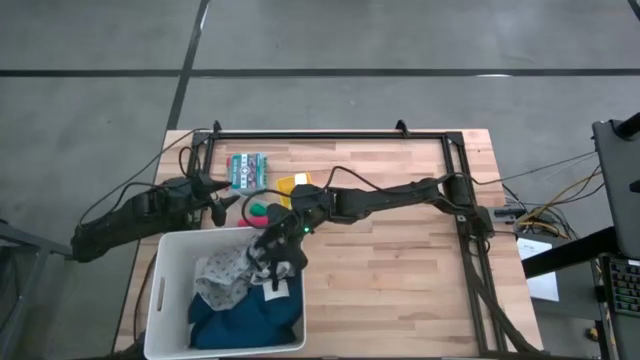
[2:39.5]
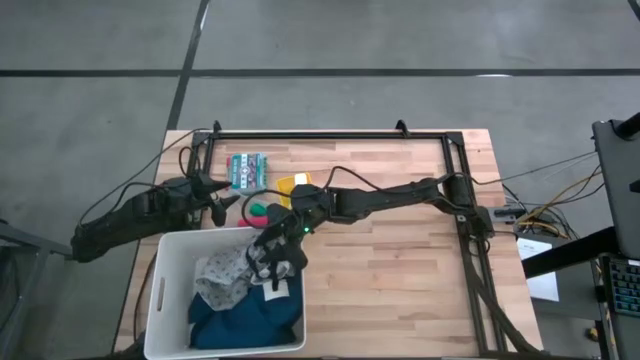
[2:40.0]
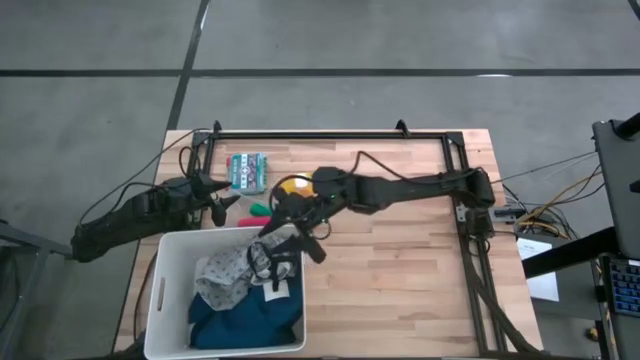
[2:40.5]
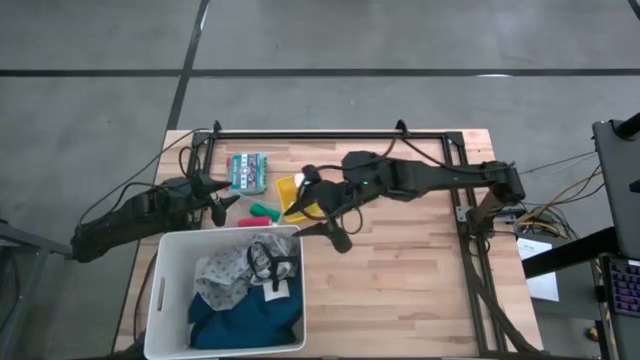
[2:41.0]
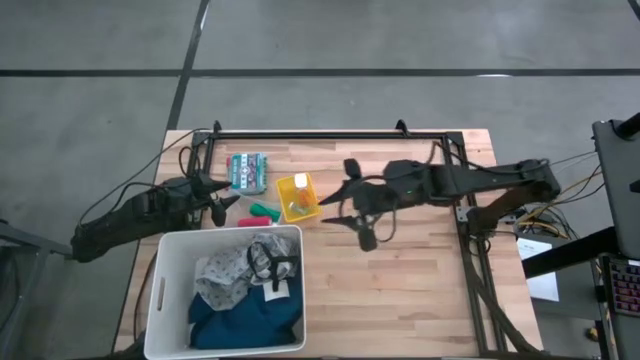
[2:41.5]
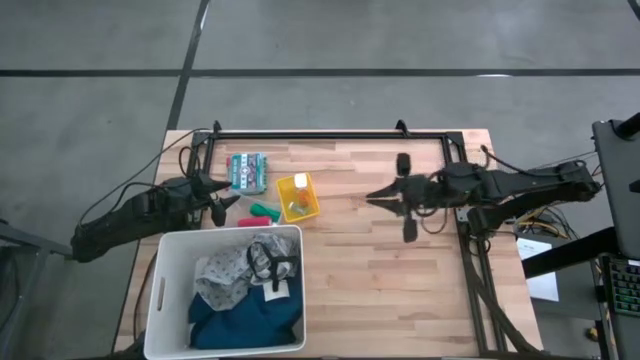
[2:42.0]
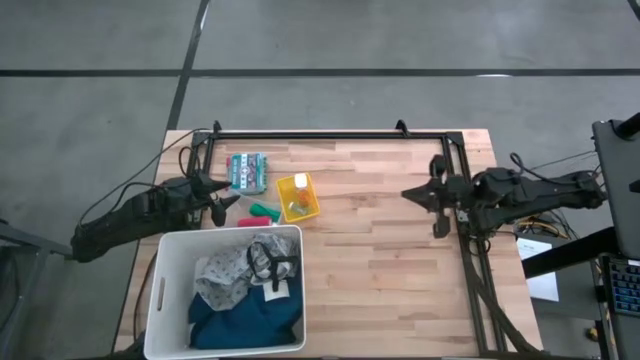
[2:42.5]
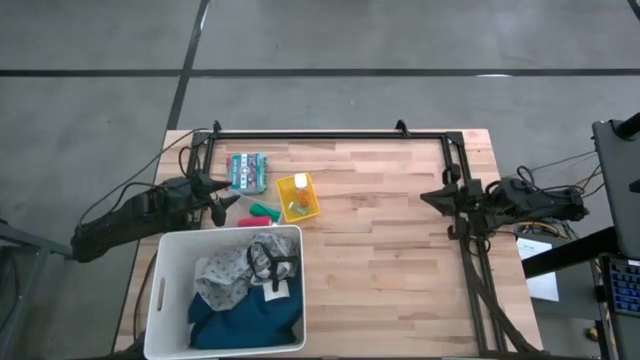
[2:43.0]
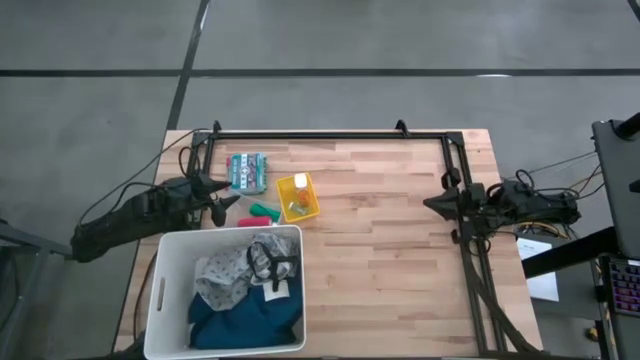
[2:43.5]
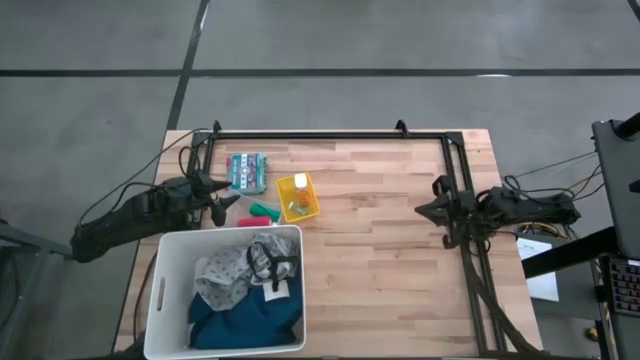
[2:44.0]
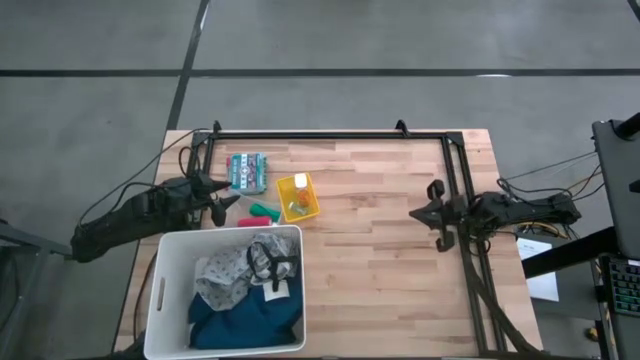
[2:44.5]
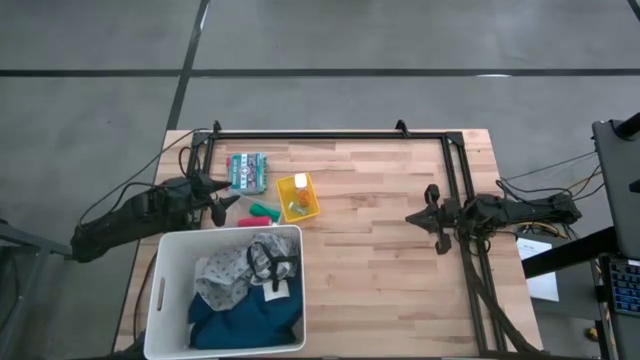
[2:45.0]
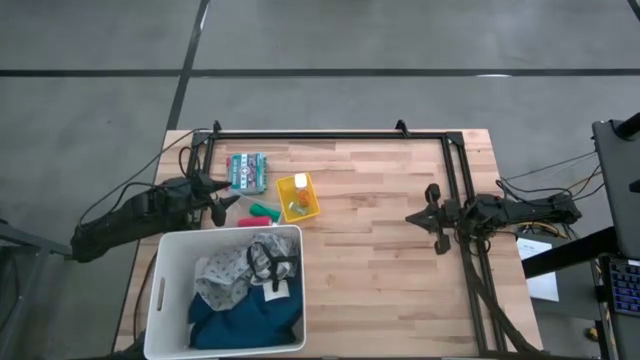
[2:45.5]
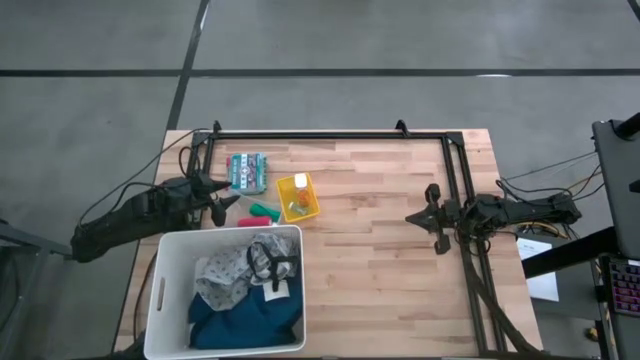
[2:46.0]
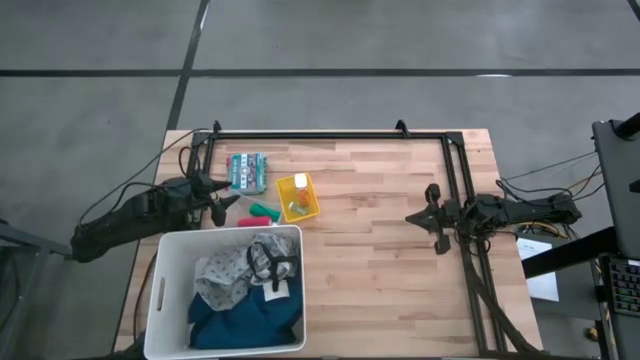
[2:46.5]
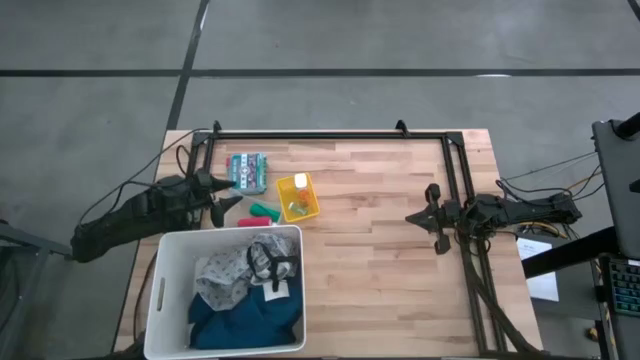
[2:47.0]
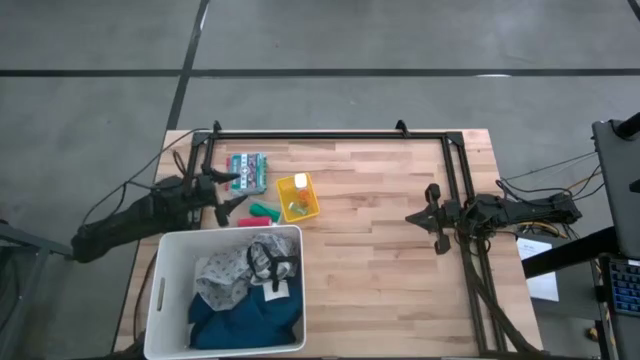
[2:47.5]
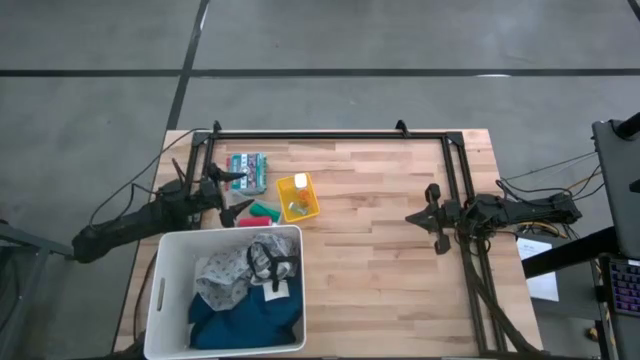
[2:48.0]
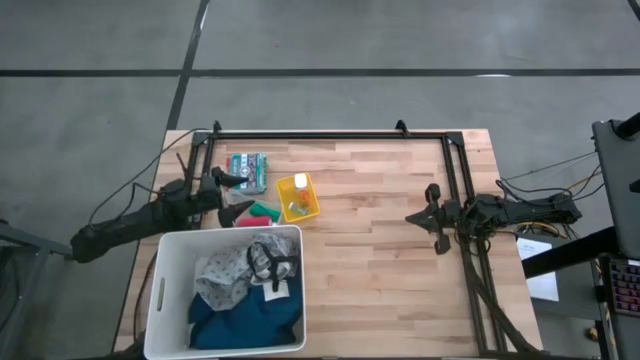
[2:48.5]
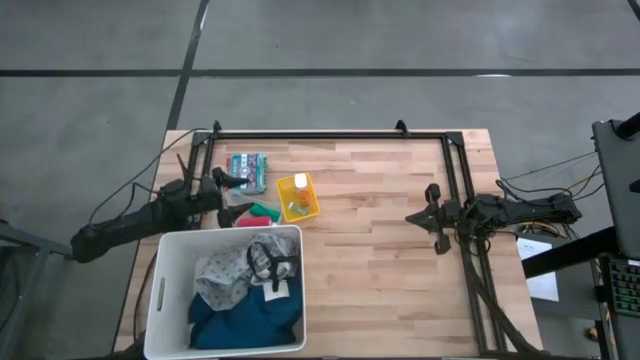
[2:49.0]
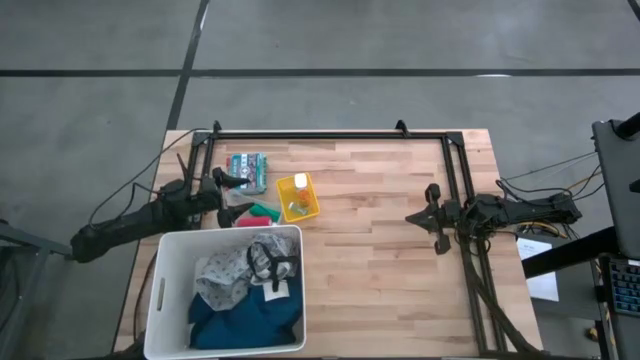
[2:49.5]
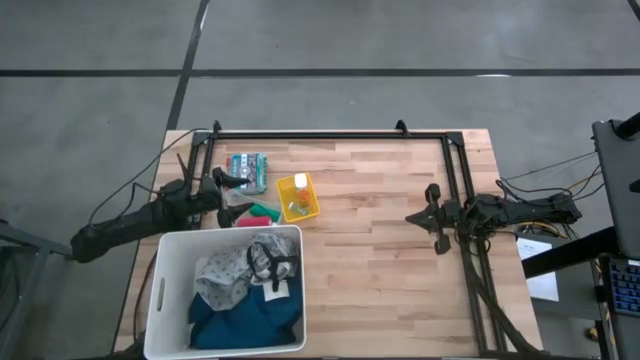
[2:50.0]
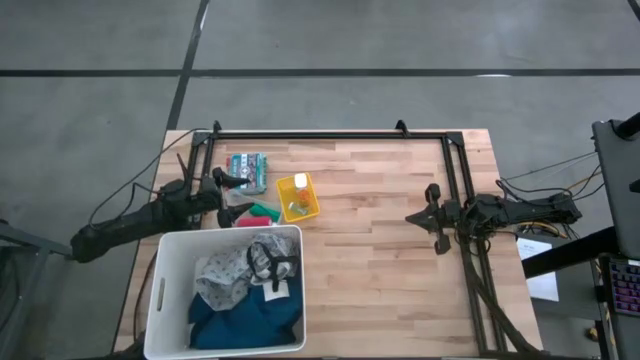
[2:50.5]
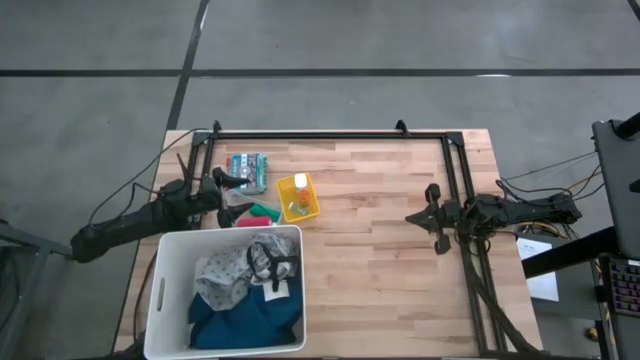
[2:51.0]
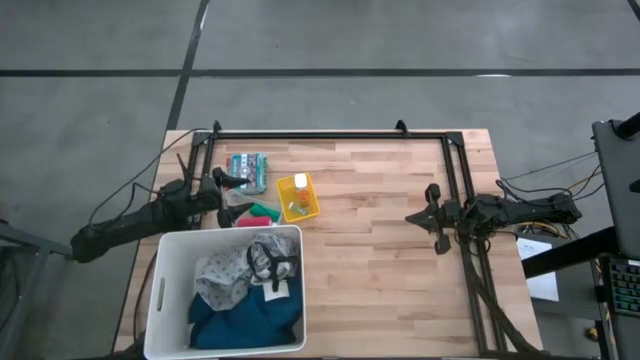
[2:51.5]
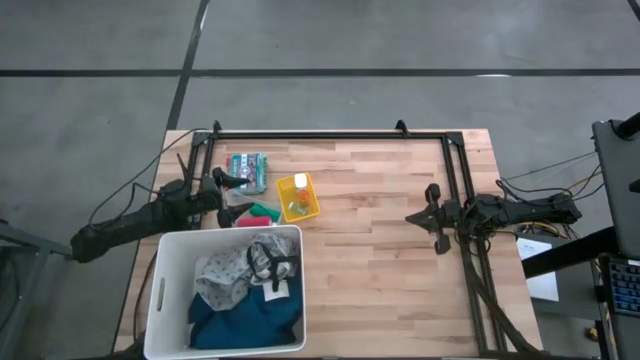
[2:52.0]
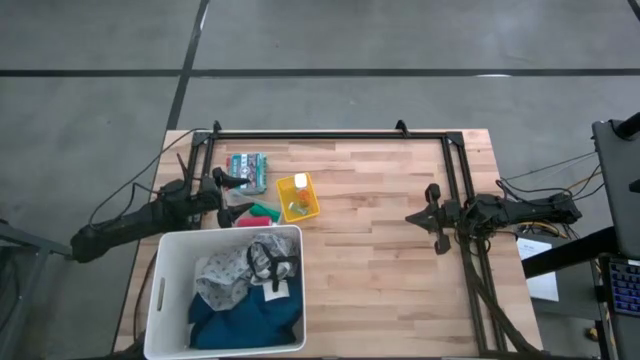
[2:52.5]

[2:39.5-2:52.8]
Task: Pick & place medical supplies in basket/bin
Return to Home Position

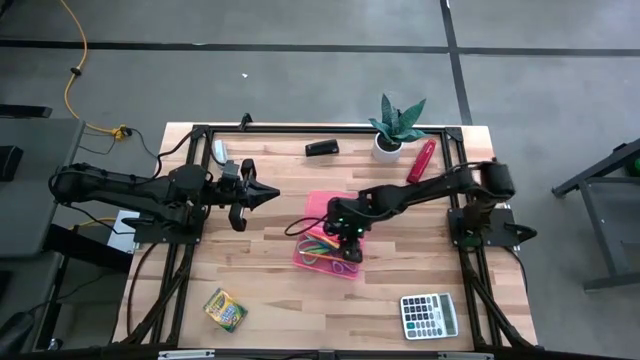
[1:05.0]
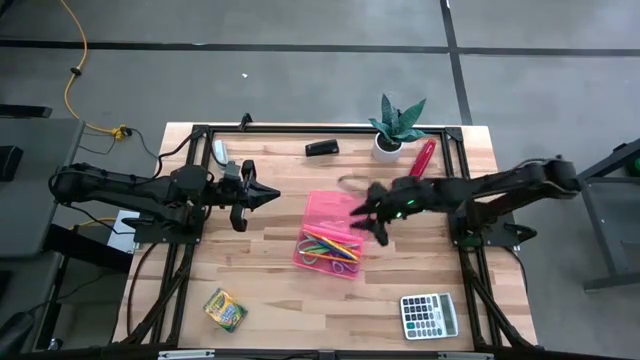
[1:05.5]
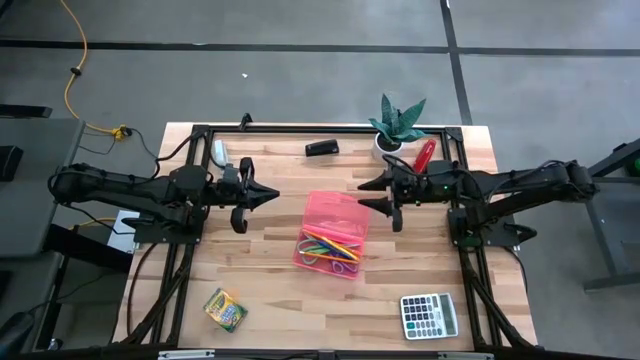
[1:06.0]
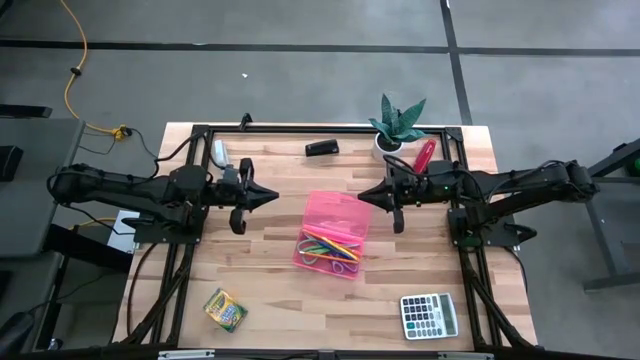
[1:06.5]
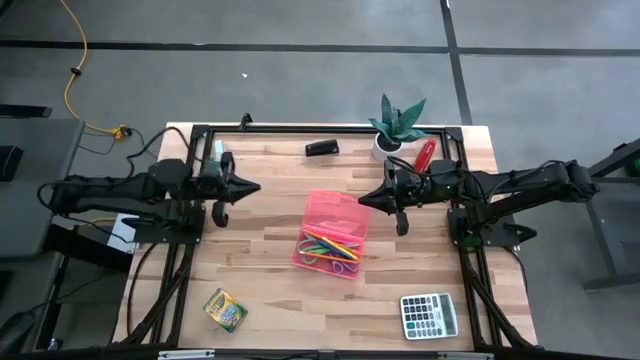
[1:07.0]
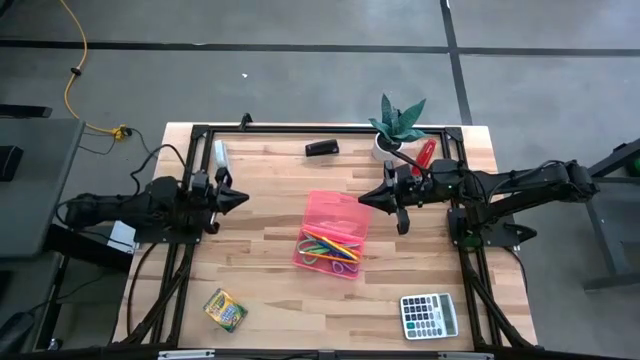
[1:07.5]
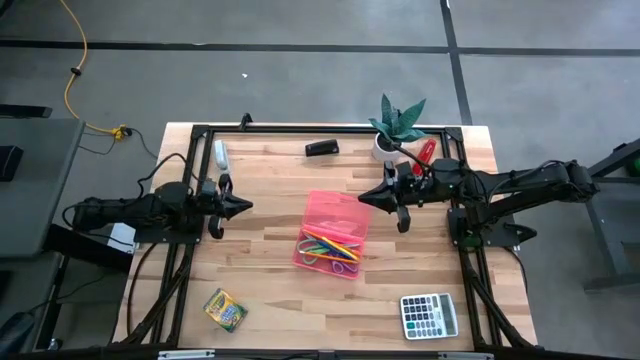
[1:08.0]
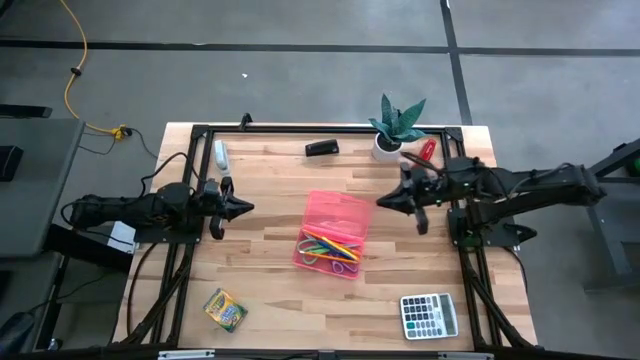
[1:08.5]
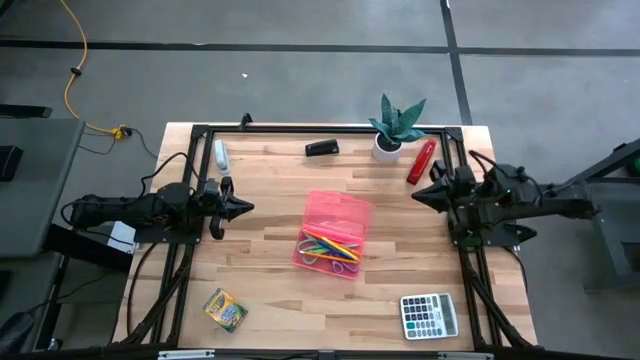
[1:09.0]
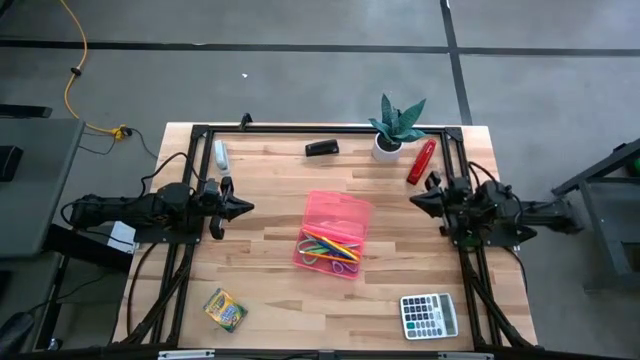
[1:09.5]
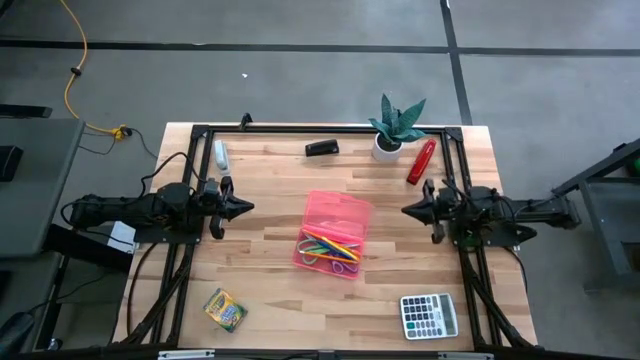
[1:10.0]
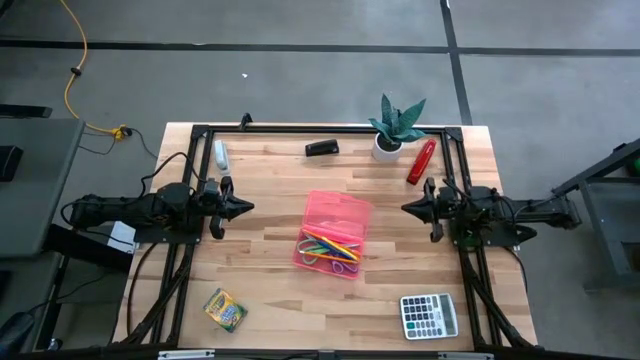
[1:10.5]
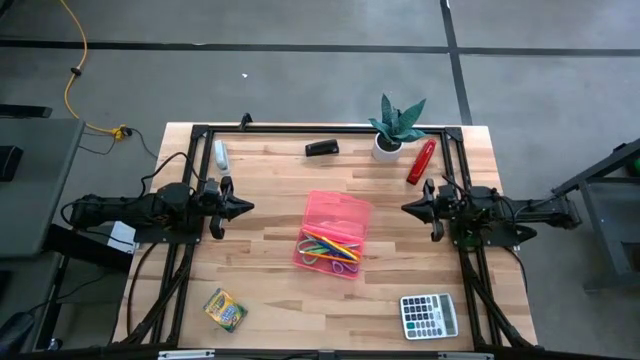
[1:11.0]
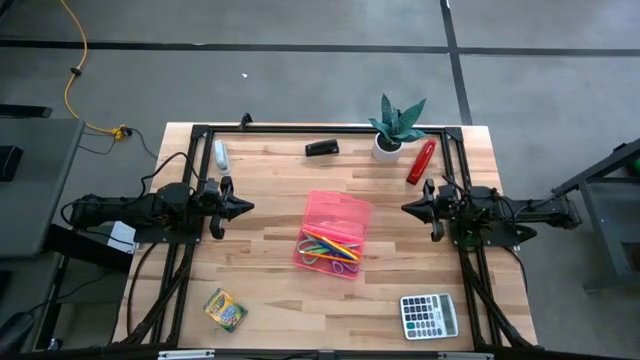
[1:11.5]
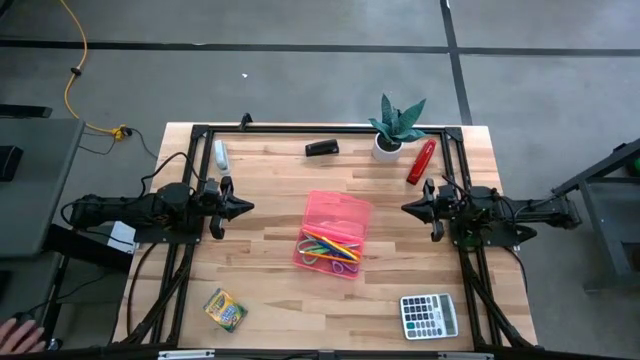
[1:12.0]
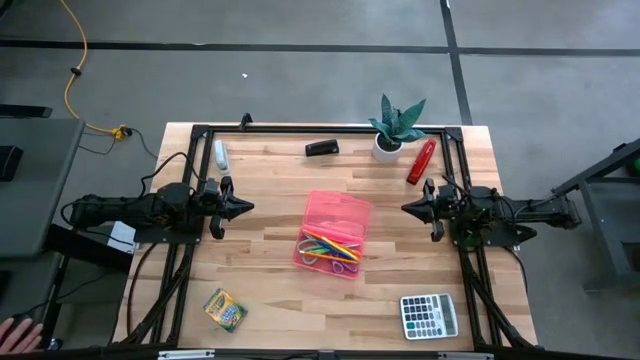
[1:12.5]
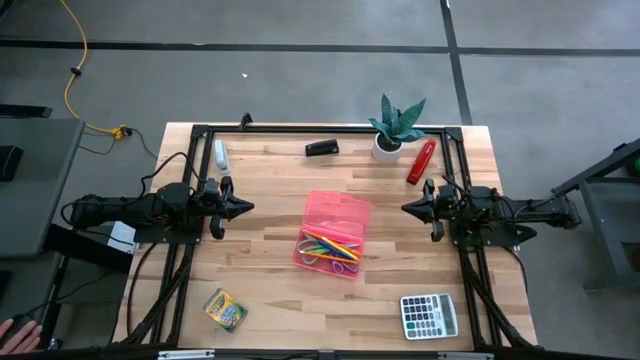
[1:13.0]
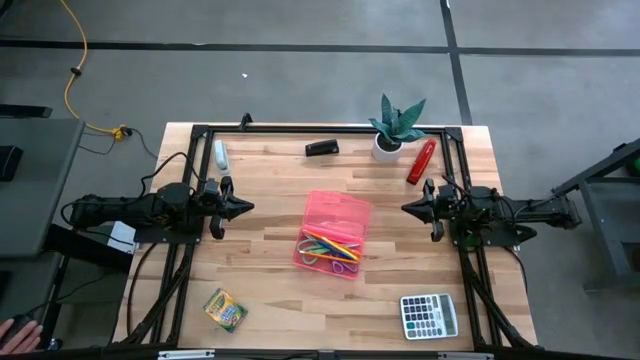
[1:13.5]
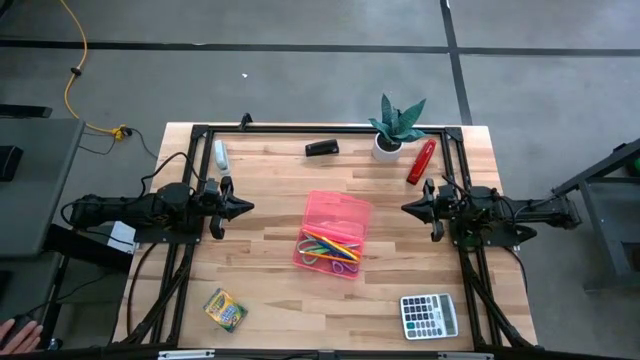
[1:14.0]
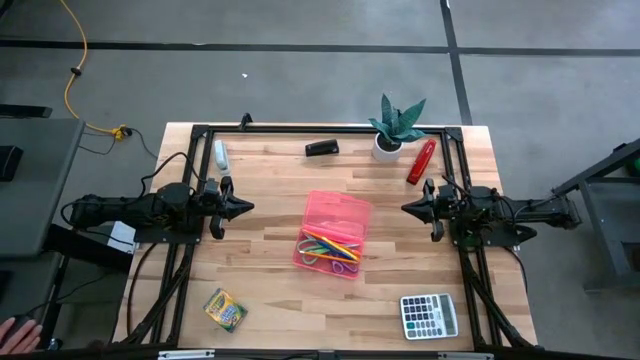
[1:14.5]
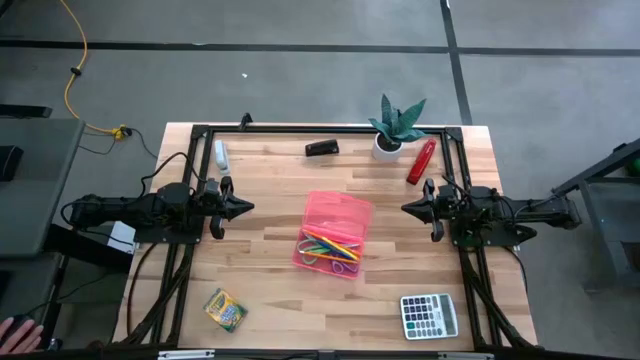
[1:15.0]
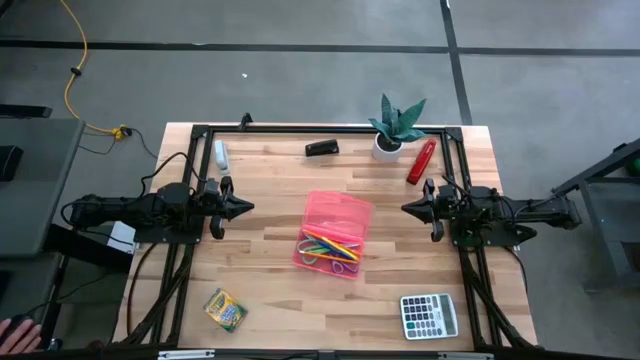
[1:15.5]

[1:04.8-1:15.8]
Task: Pick & place school supplies into a supply box
Return to Home Position
